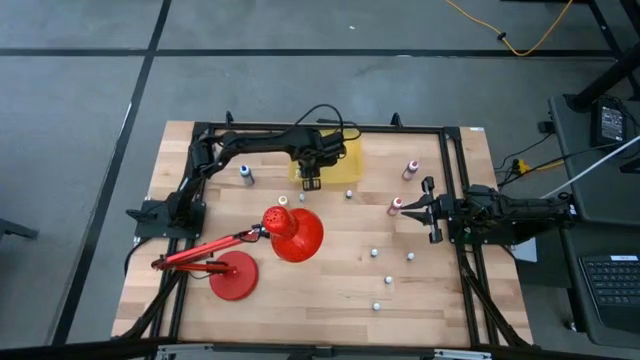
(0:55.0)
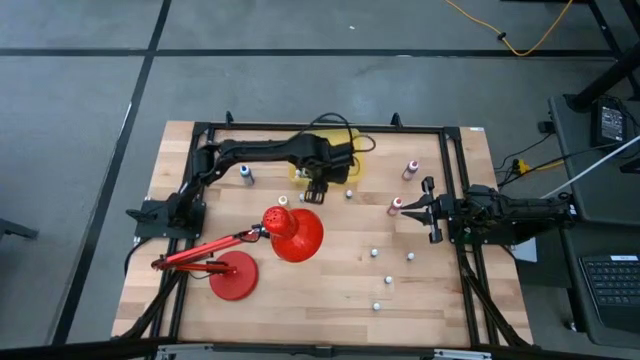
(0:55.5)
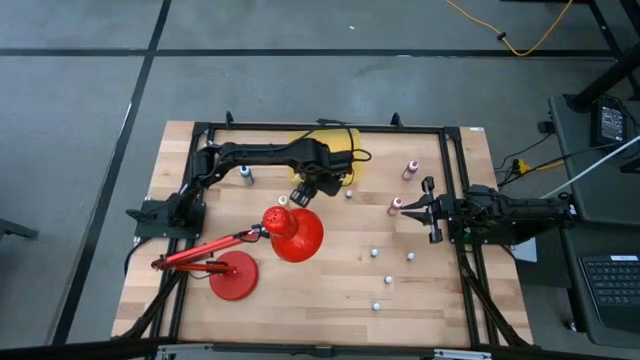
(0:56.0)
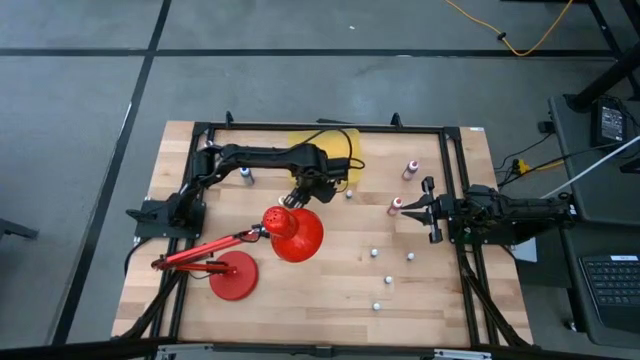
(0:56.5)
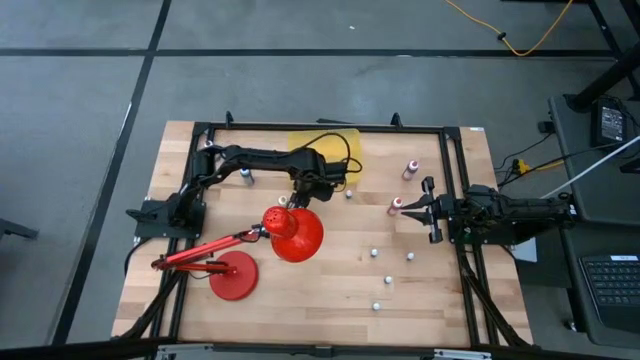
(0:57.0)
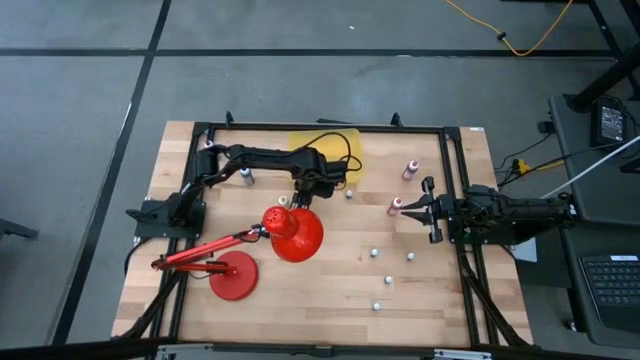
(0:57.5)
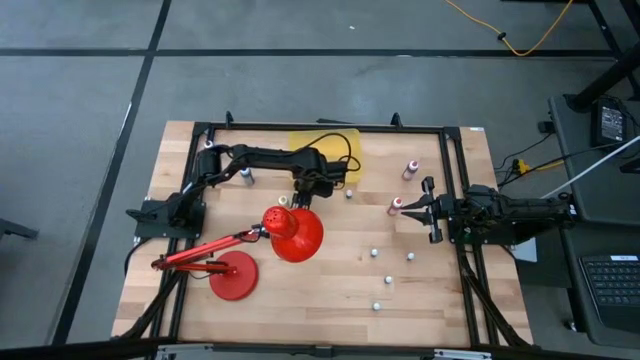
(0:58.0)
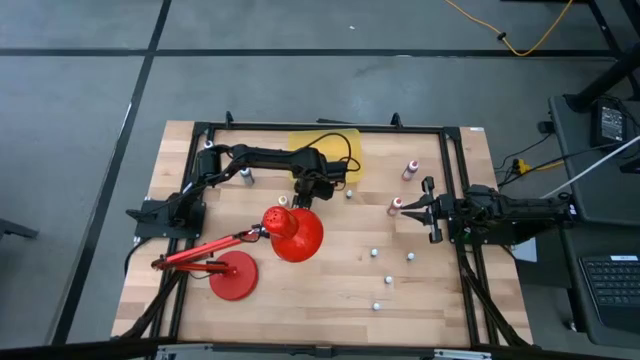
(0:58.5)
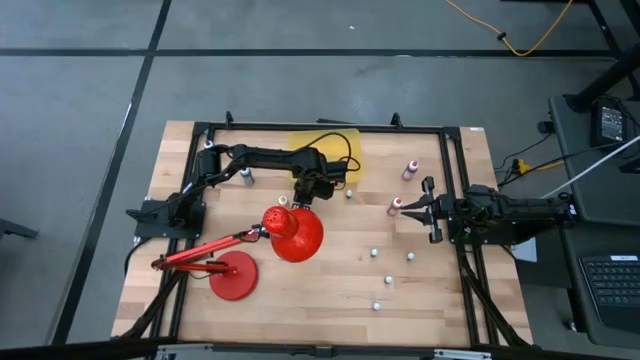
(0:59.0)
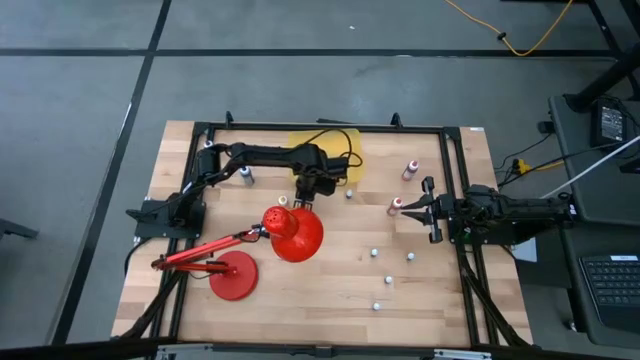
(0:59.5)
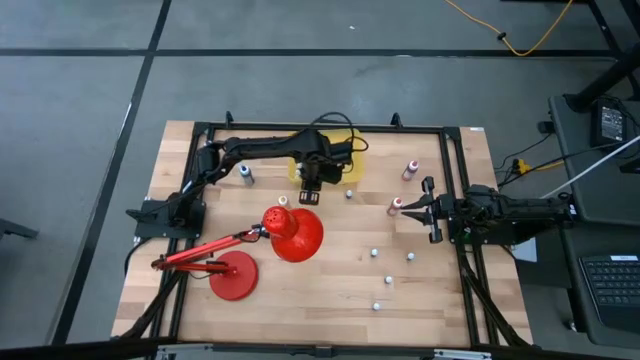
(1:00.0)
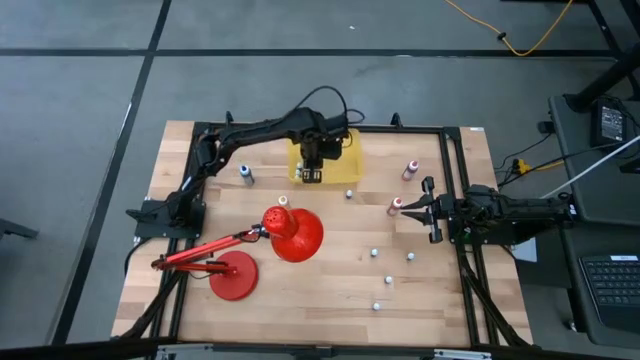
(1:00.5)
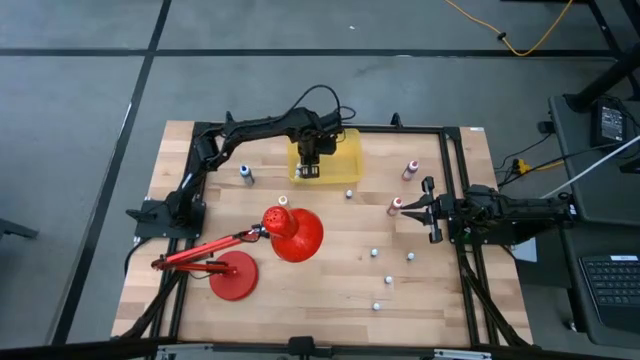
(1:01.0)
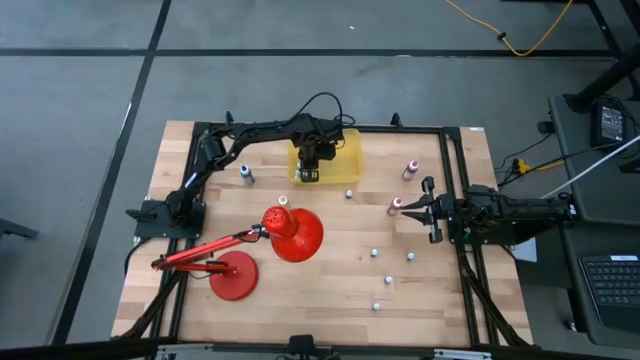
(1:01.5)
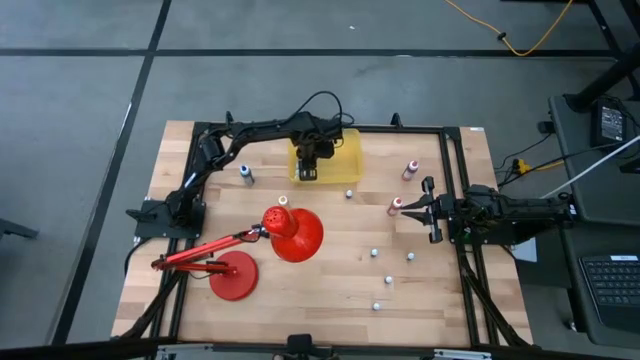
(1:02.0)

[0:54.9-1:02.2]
Task: Pick & Place food coloring
Put the blue food coloring bottle into the yellow bin

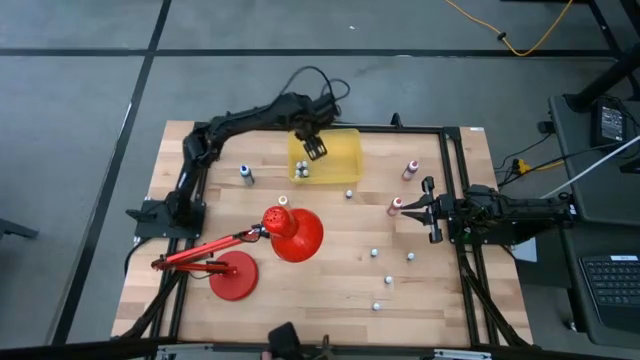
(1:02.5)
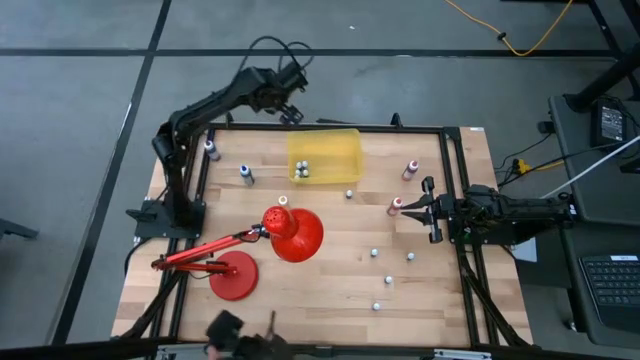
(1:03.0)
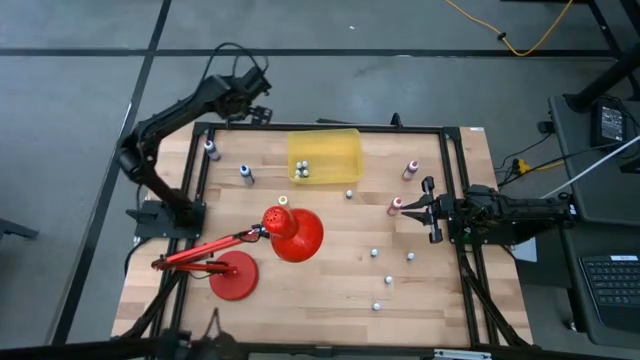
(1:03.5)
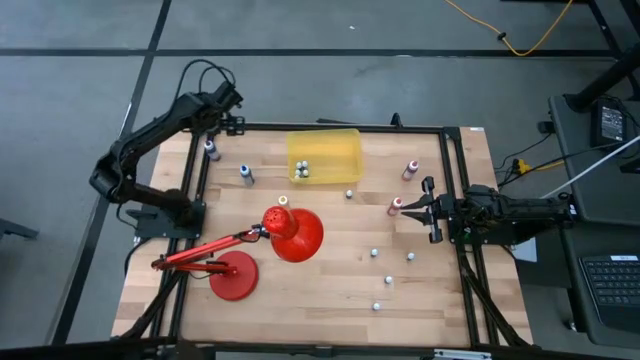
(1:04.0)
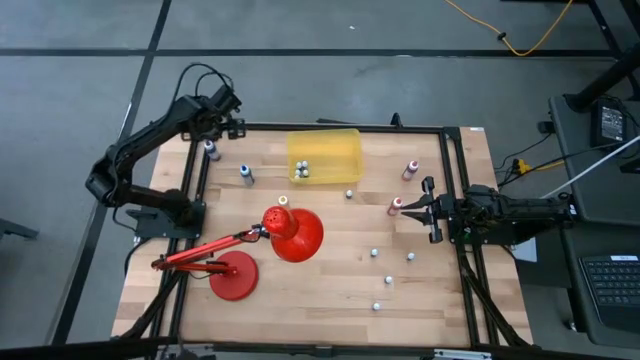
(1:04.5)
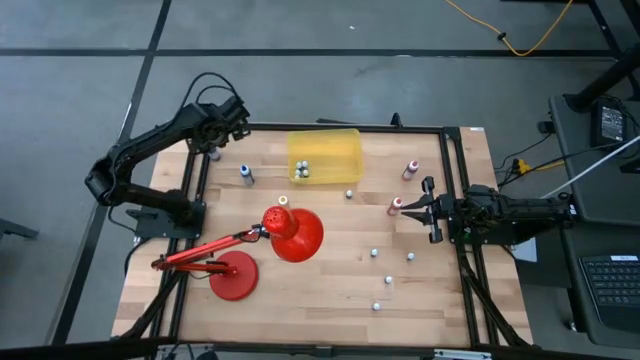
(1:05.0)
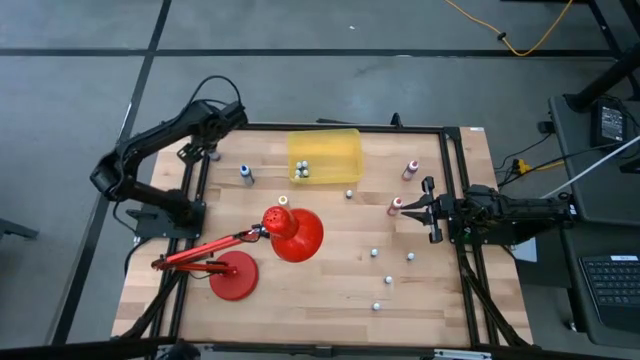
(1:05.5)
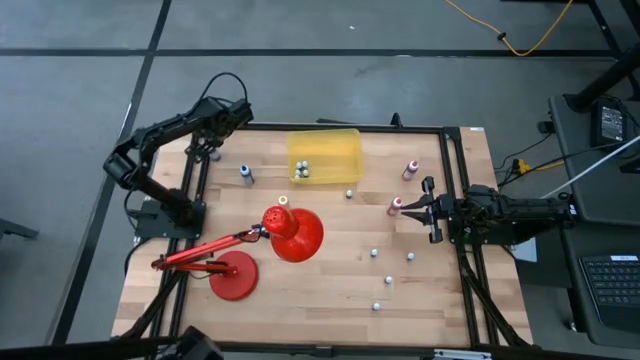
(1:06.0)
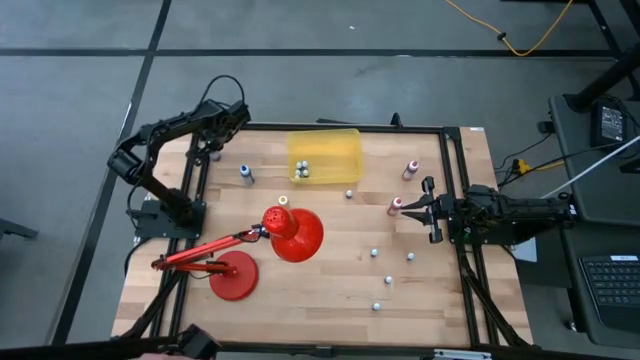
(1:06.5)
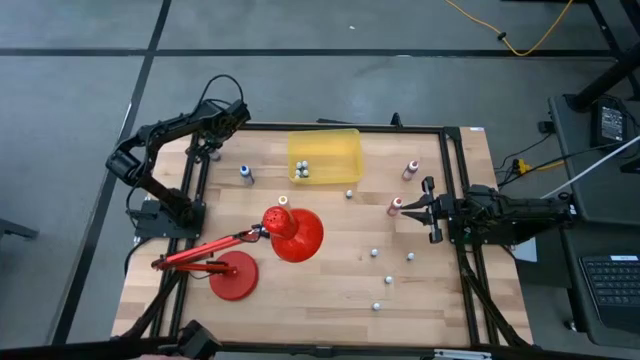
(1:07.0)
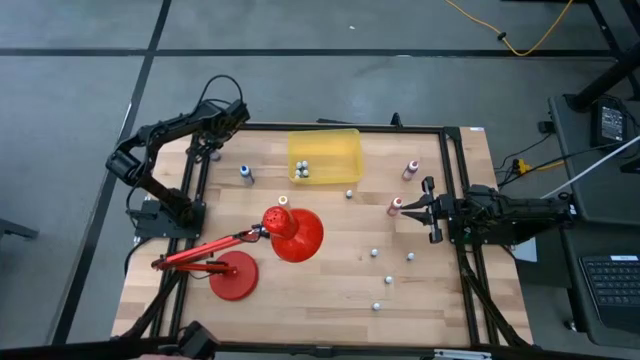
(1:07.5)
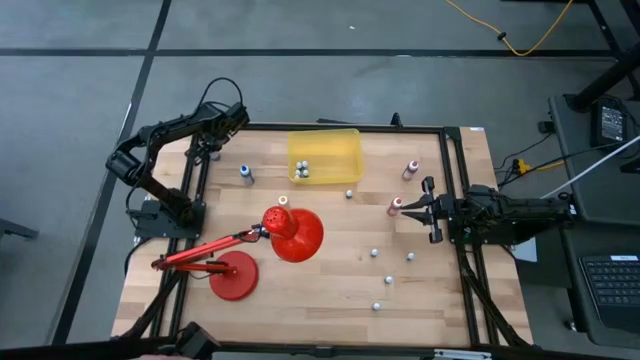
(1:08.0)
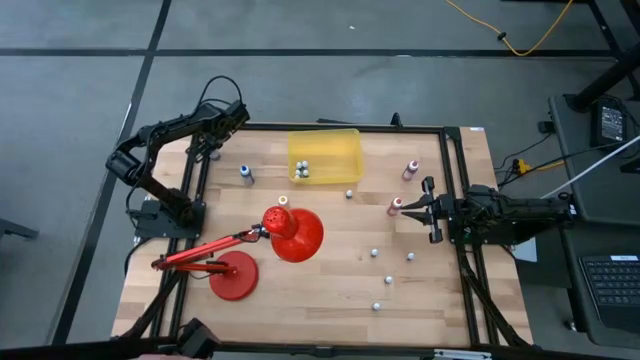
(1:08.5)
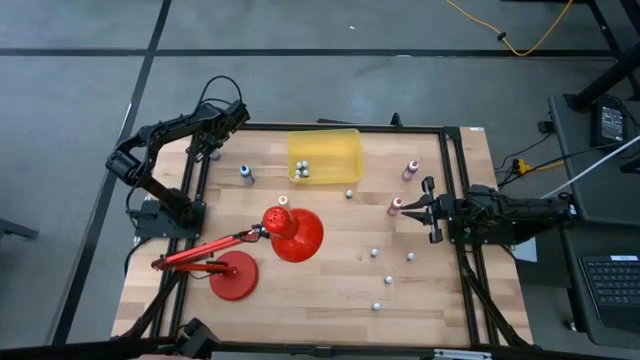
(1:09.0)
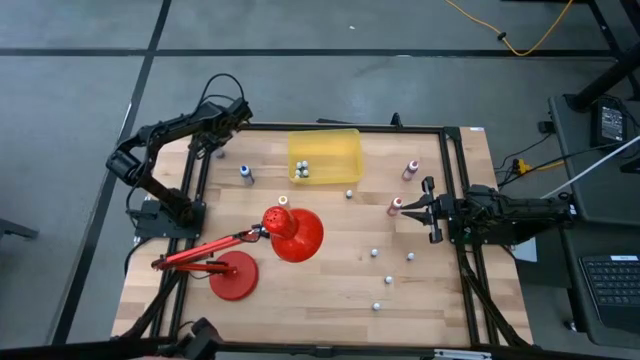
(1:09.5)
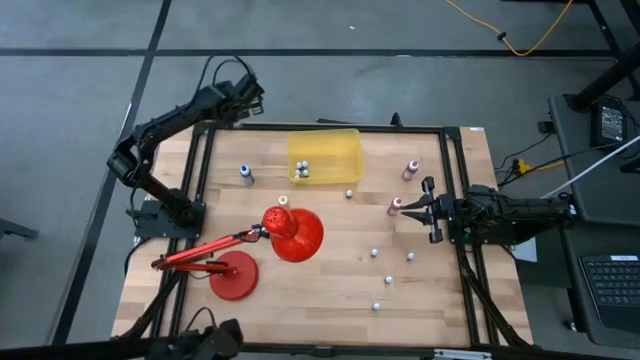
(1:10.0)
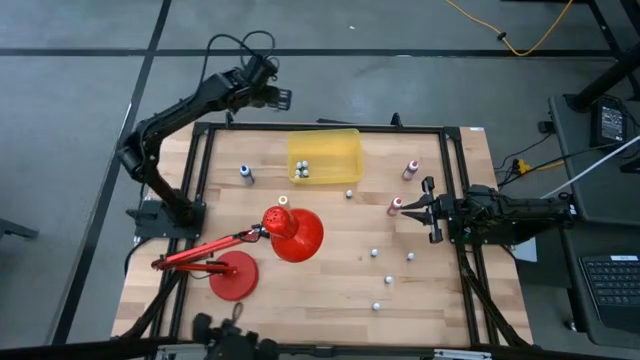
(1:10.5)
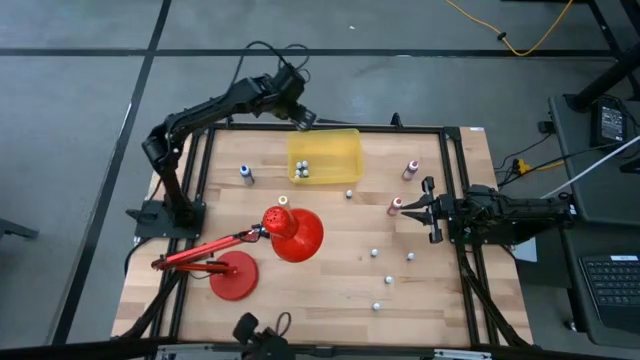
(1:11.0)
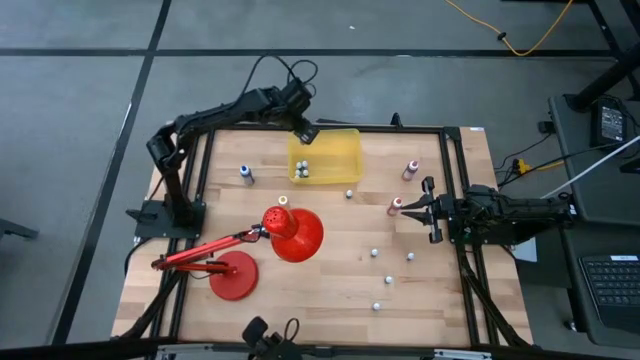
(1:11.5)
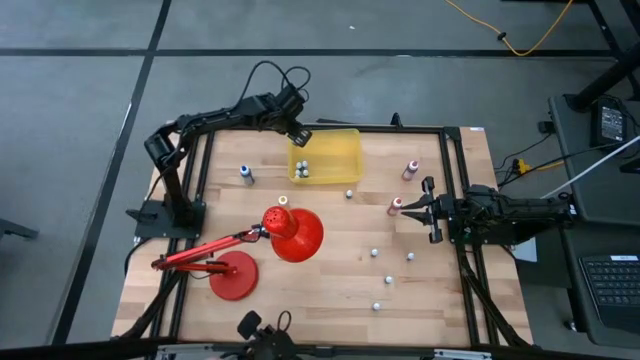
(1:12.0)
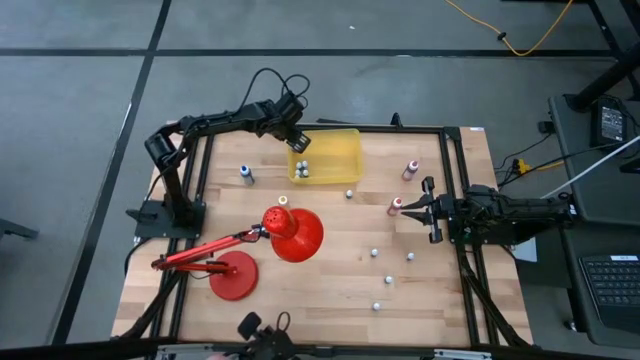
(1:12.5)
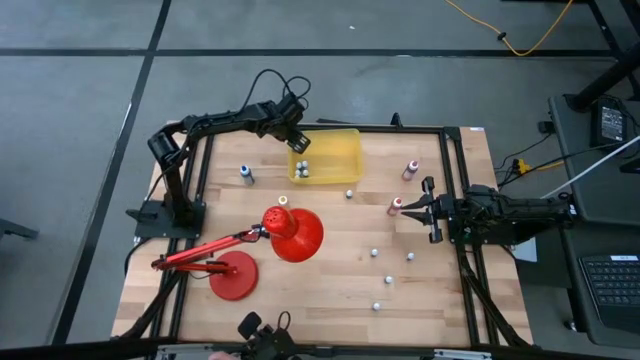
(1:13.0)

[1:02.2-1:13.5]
Put the purple food coloring bottle into the yellow bin

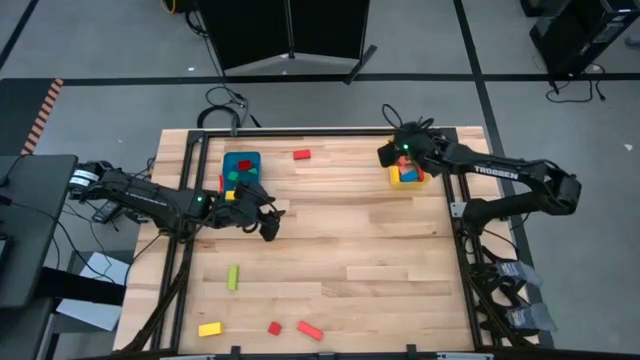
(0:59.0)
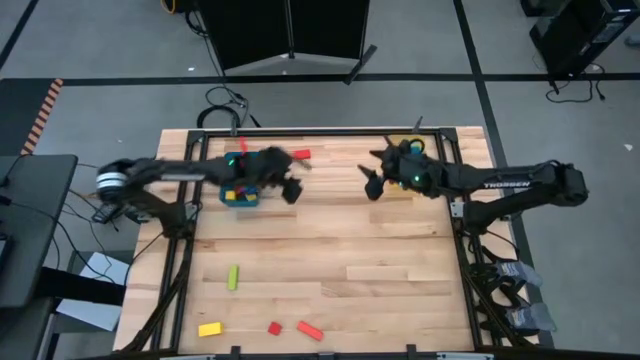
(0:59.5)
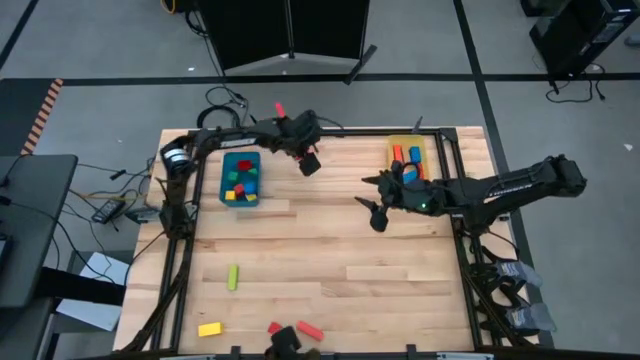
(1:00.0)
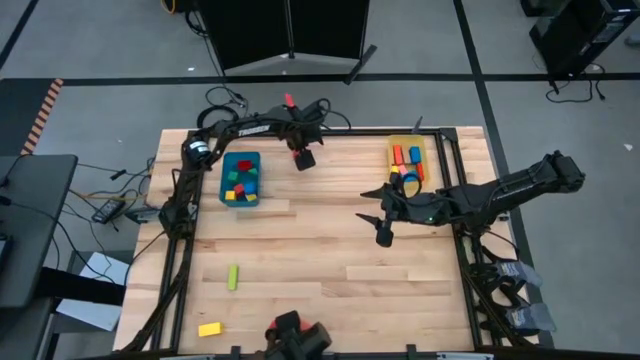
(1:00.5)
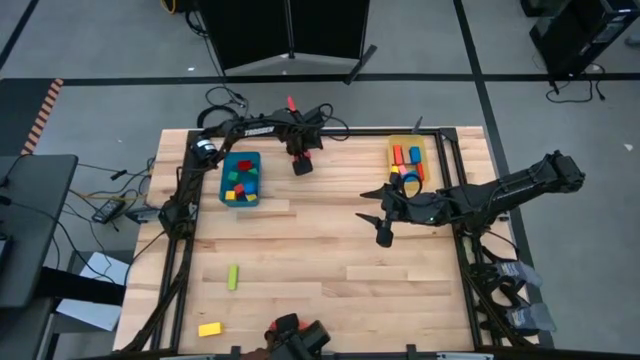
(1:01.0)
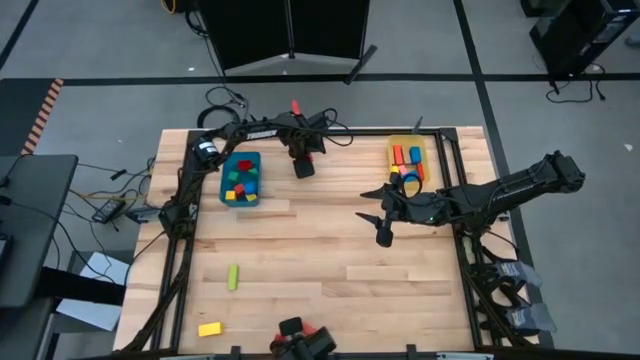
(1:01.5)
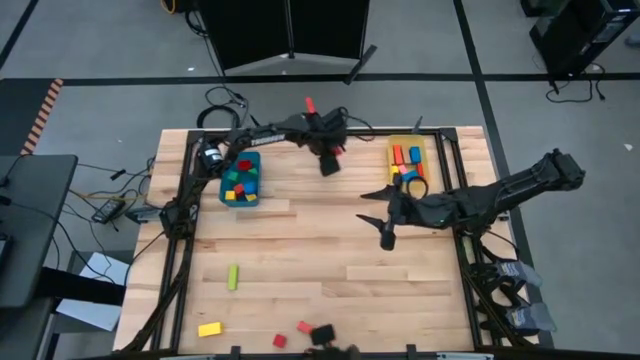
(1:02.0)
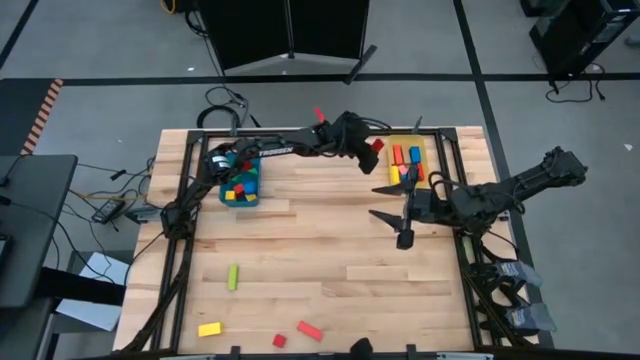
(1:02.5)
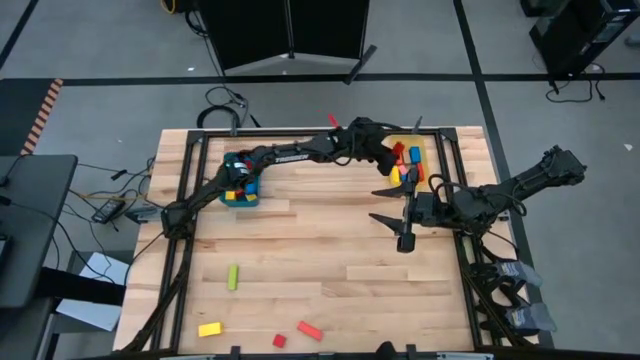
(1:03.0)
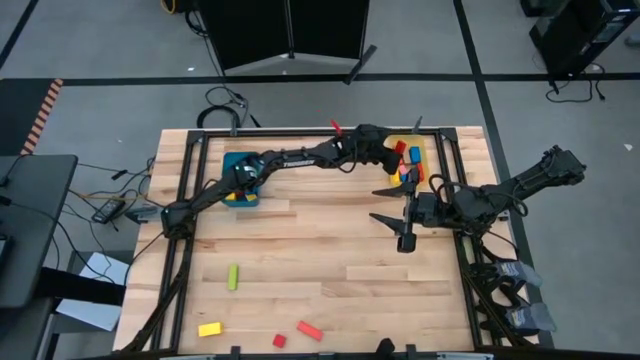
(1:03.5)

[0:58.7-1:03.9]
Task: Sort blocks by size
Put the large red block into the yellow bin
